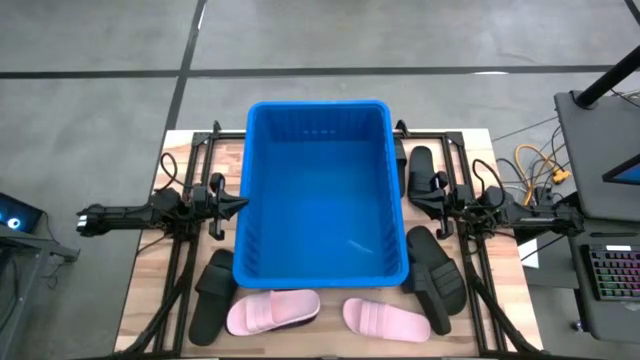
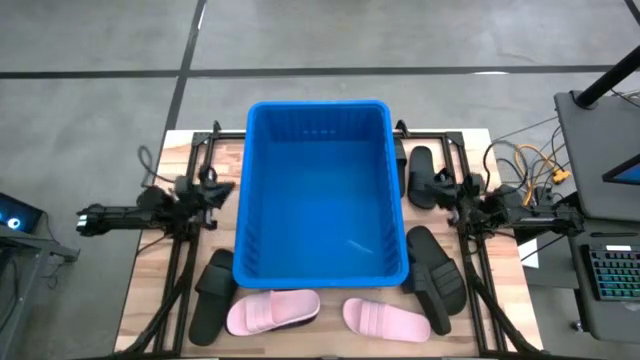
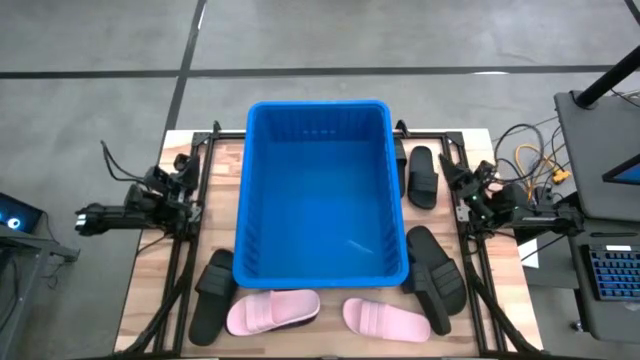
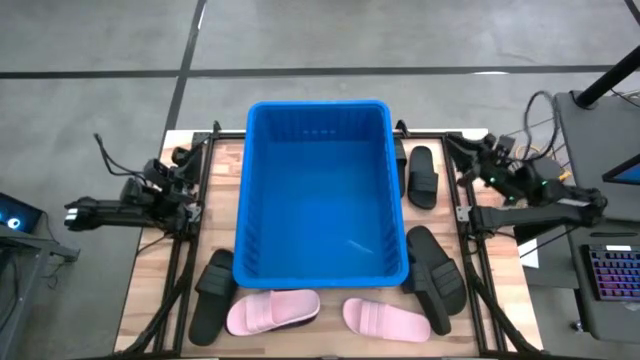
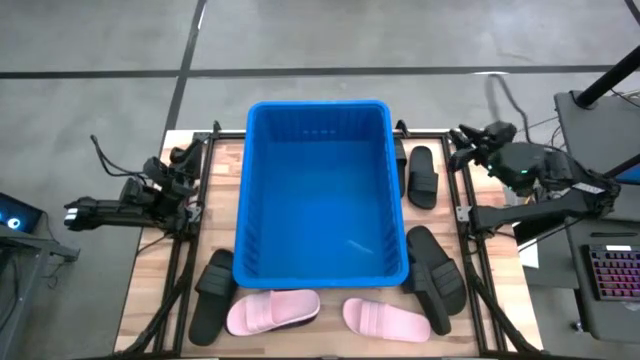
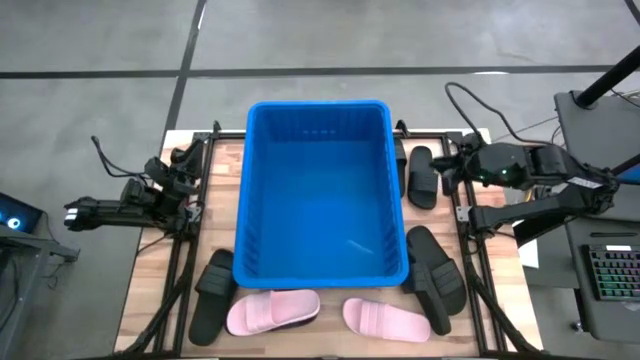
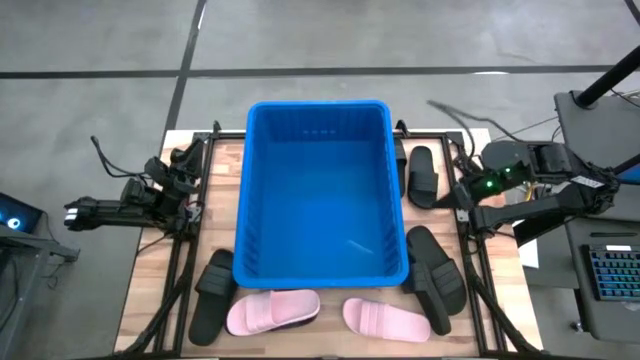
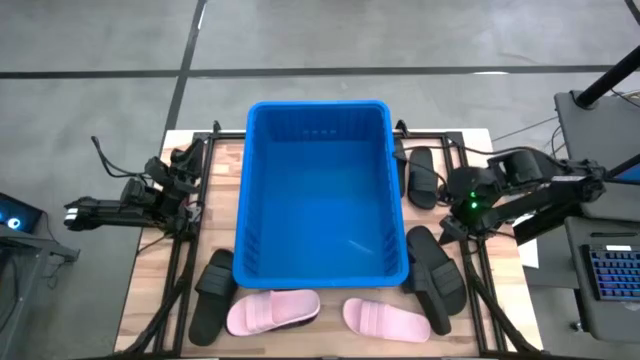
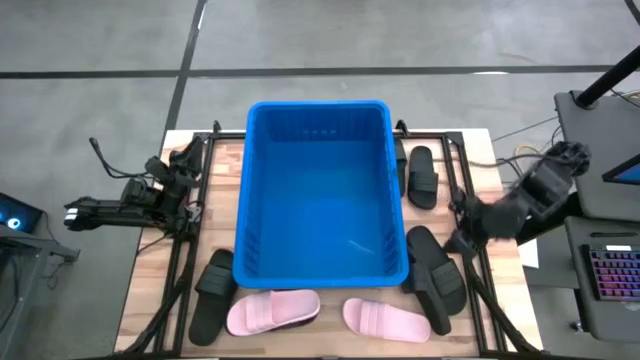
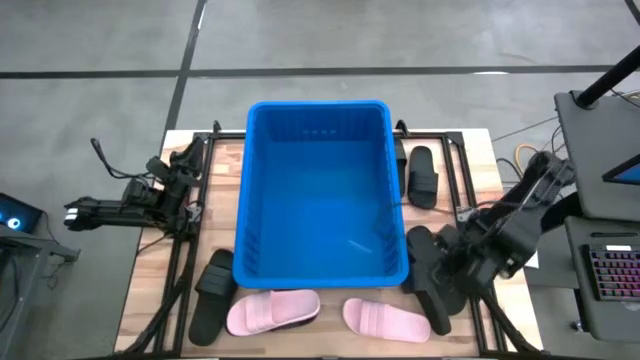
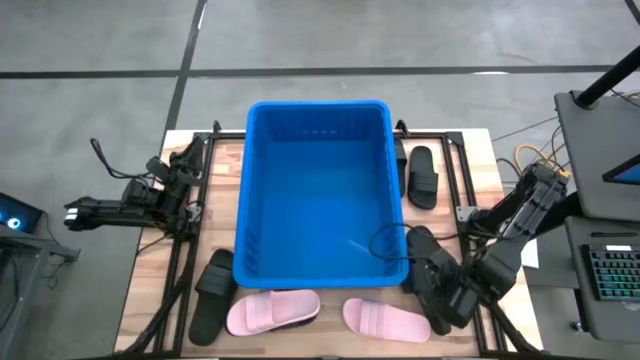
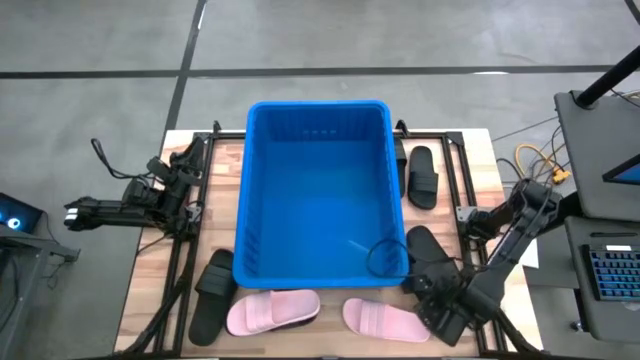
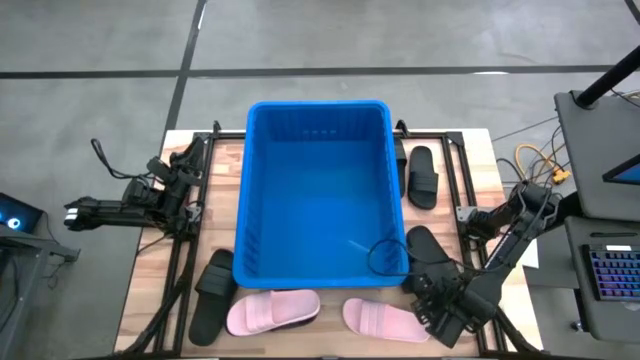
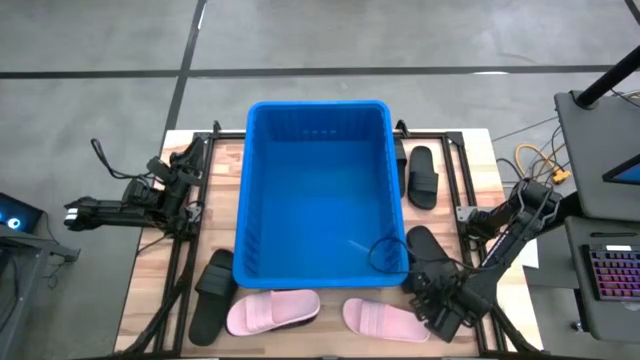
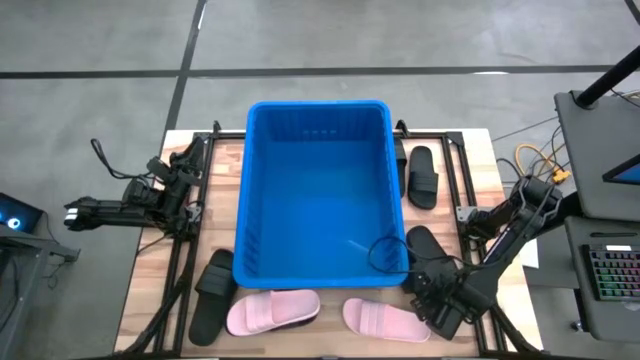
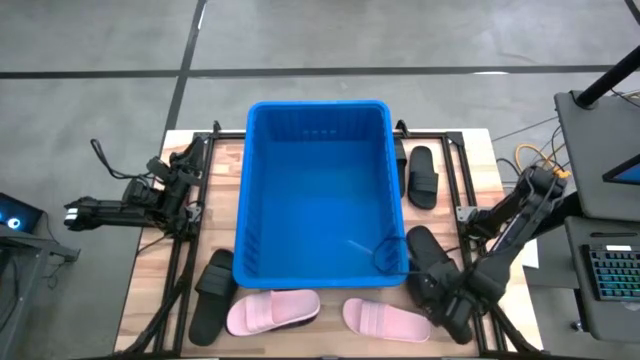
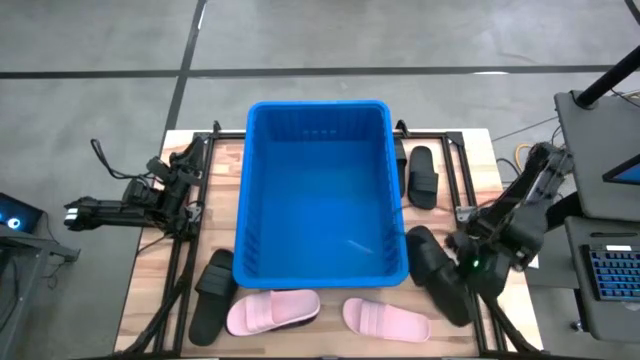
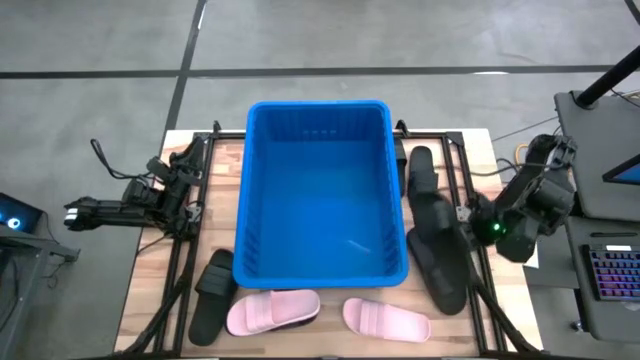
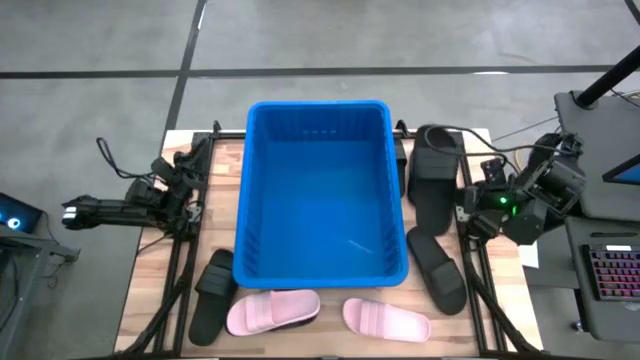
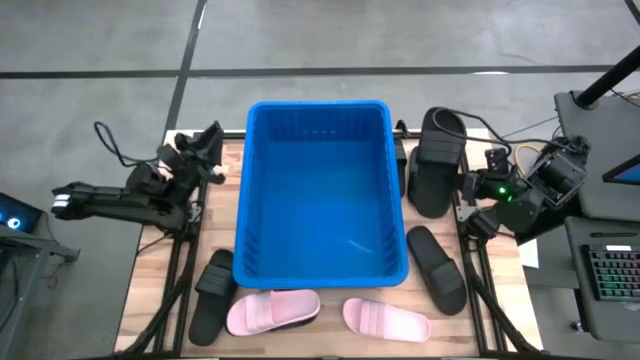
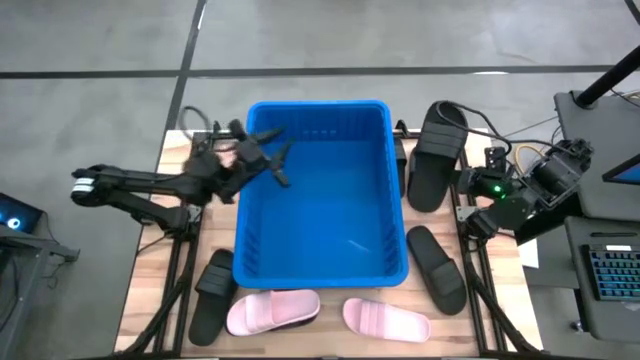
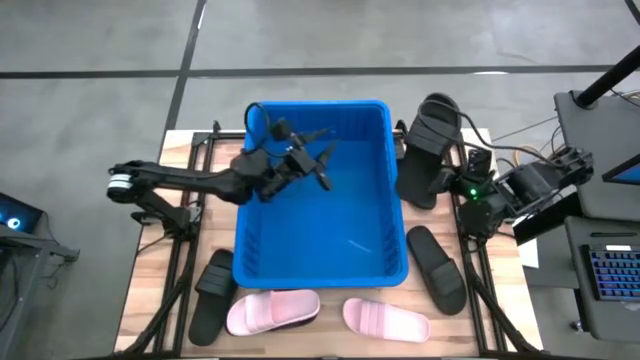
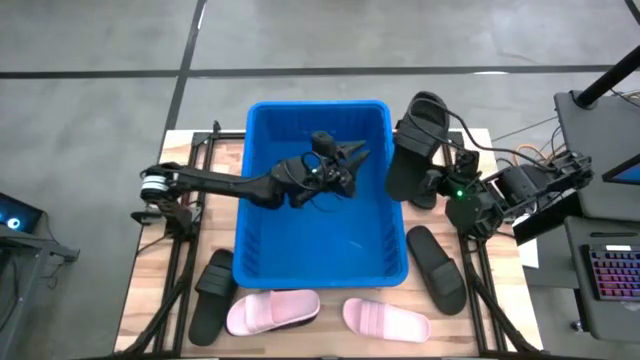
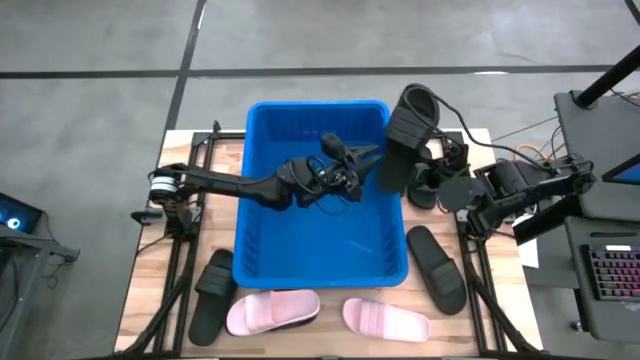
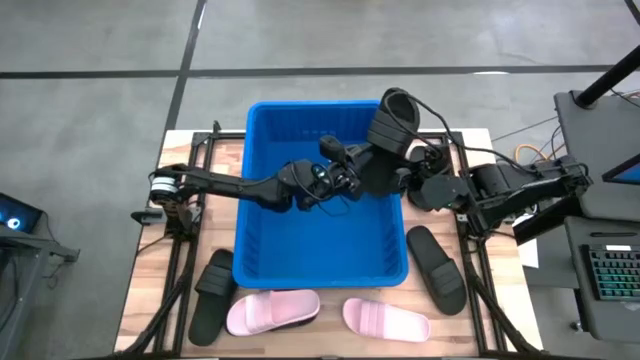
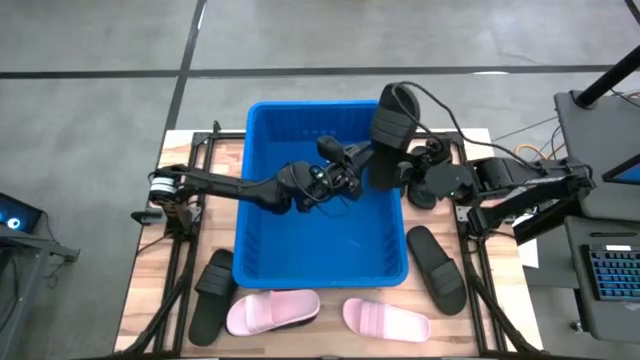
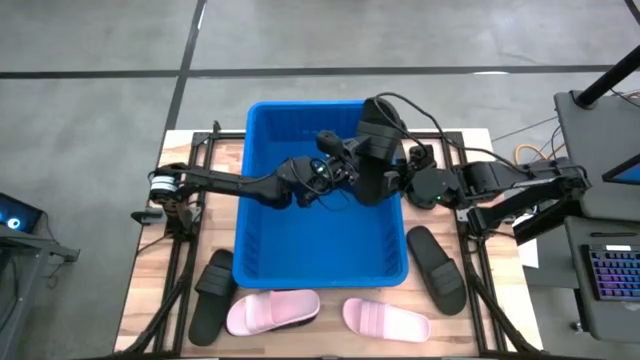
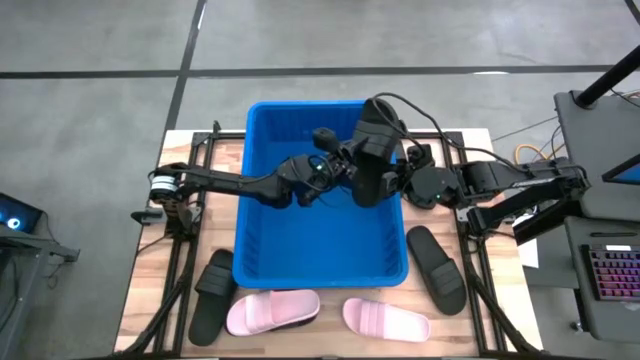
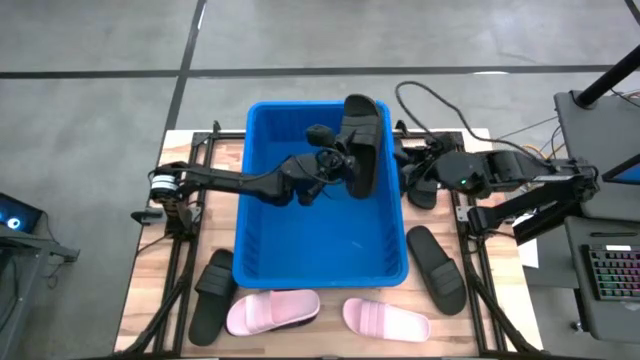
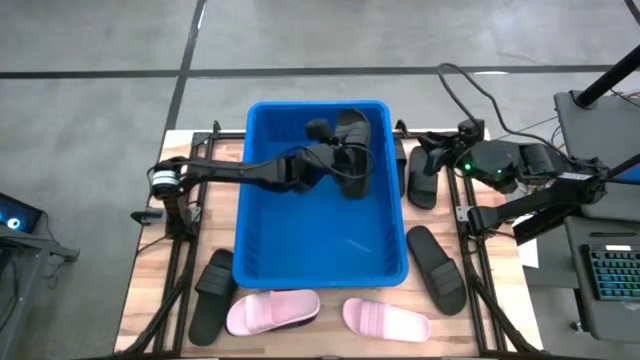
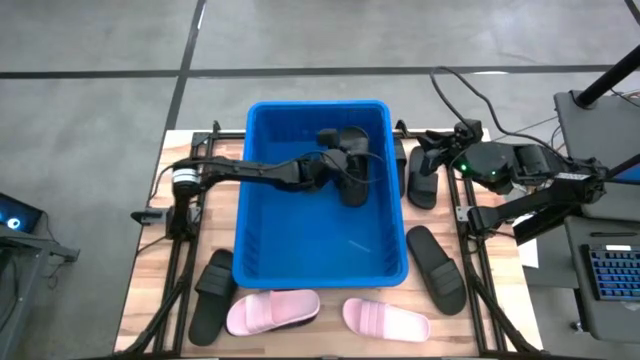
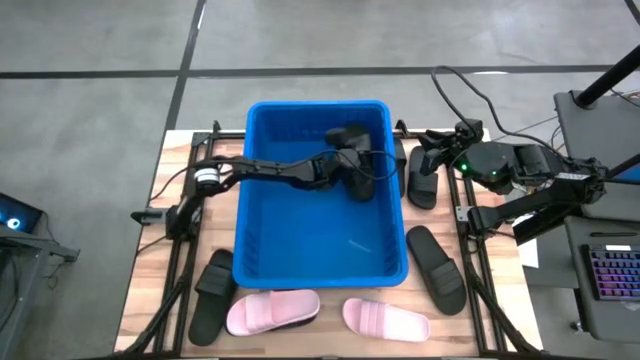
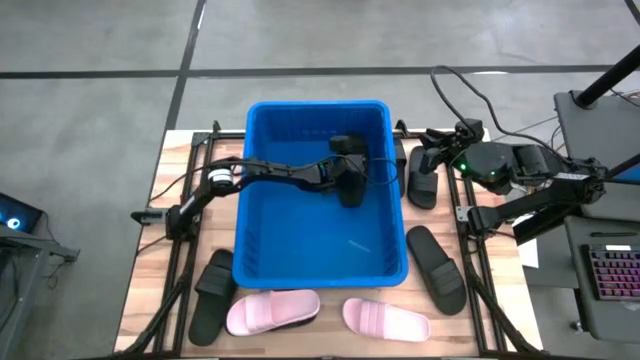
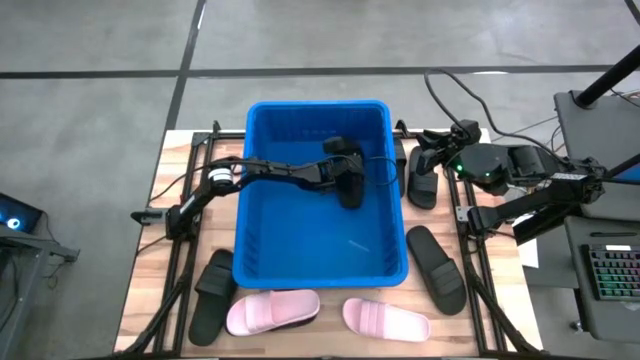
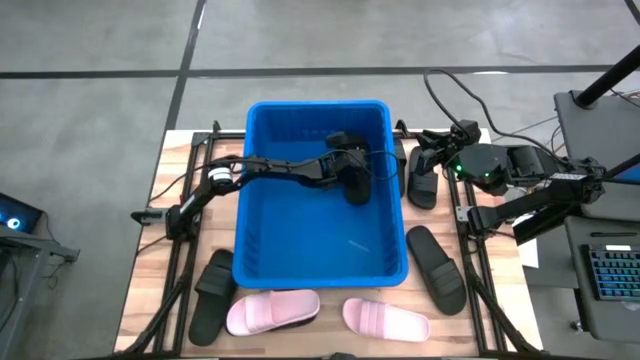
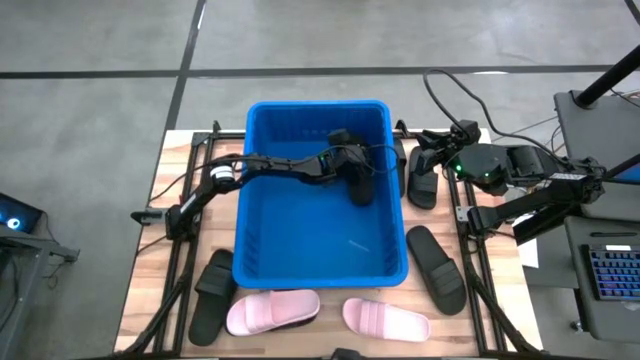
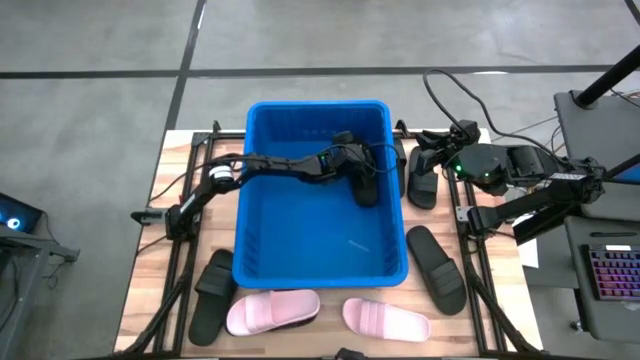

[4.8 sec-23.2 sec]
Task: Pick and place slides into bin
Put the black slides into the blue organizer bin
